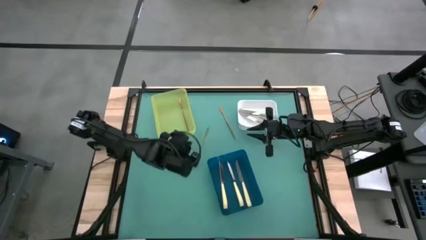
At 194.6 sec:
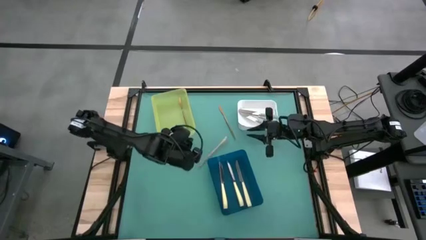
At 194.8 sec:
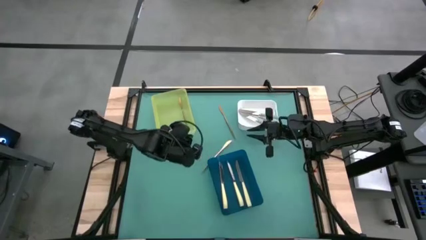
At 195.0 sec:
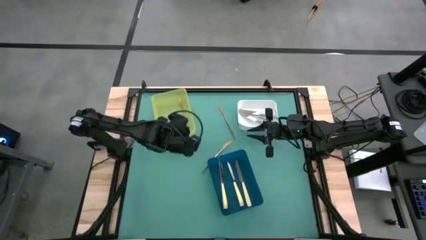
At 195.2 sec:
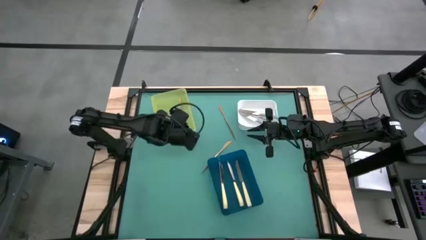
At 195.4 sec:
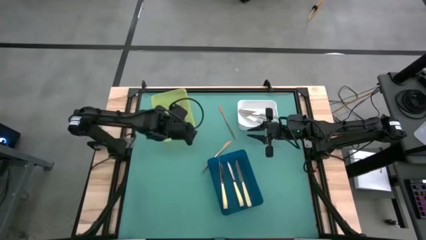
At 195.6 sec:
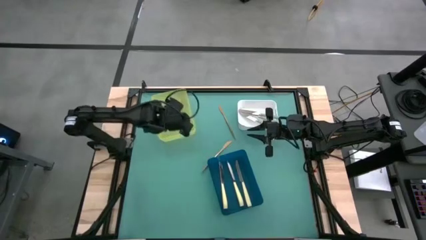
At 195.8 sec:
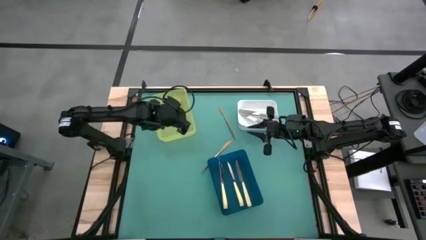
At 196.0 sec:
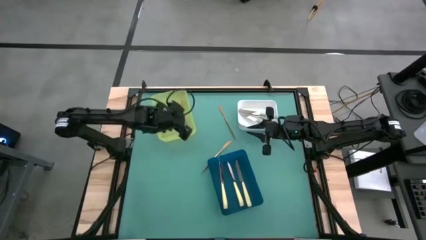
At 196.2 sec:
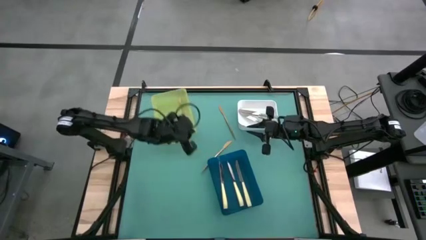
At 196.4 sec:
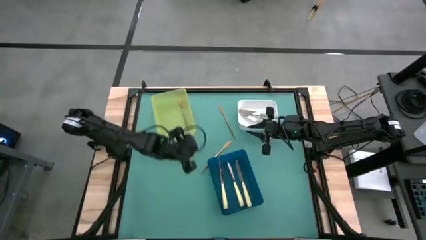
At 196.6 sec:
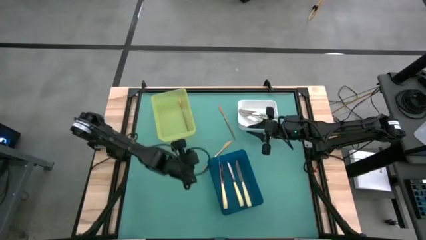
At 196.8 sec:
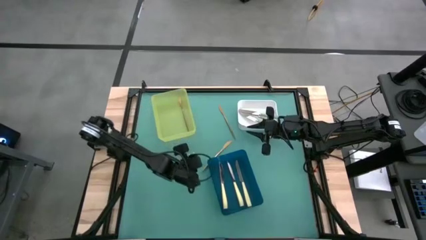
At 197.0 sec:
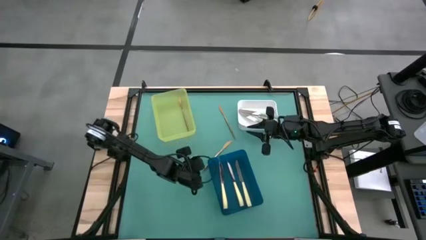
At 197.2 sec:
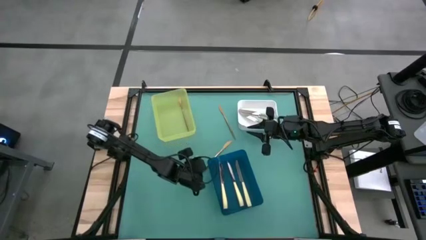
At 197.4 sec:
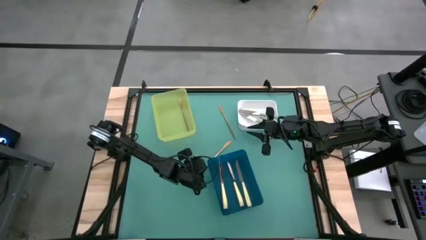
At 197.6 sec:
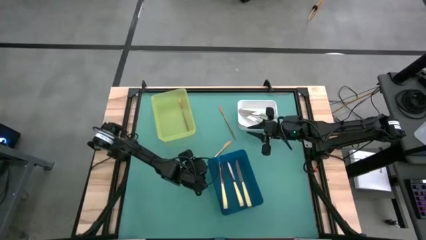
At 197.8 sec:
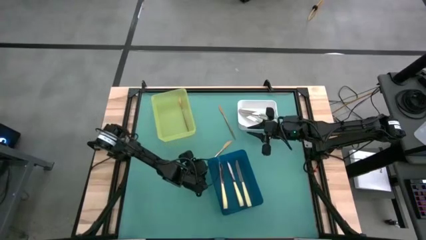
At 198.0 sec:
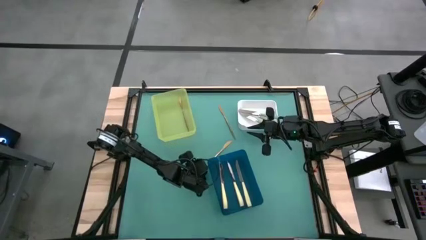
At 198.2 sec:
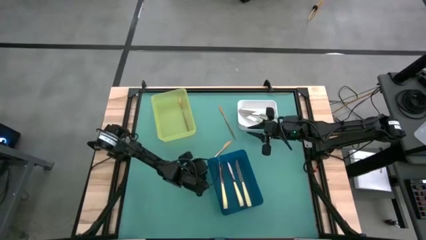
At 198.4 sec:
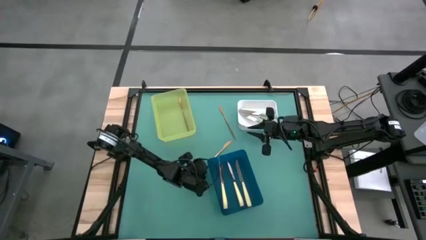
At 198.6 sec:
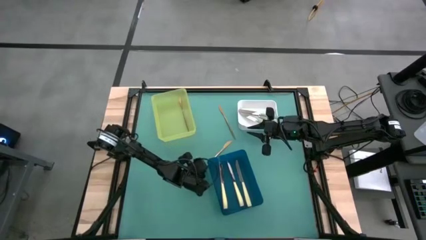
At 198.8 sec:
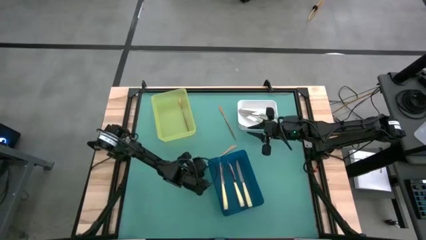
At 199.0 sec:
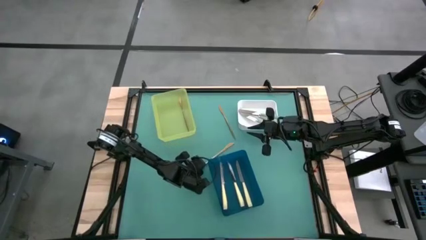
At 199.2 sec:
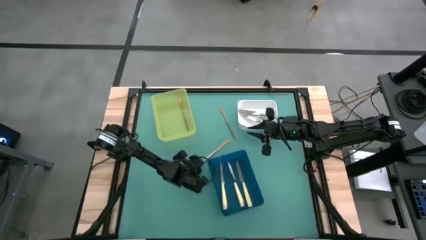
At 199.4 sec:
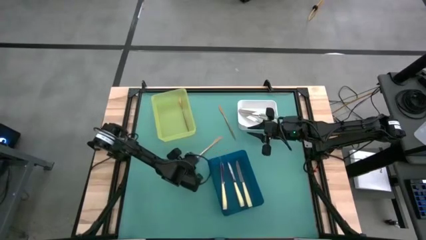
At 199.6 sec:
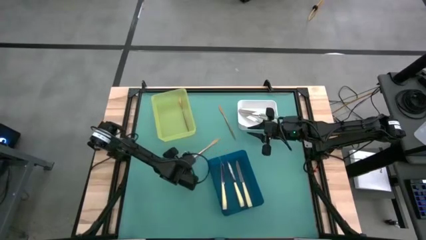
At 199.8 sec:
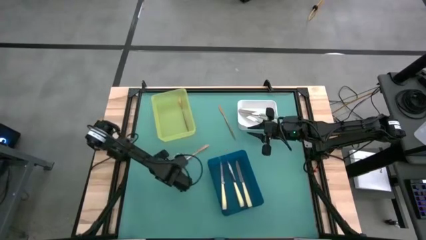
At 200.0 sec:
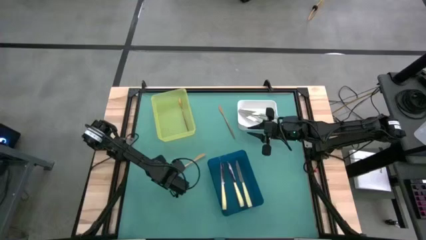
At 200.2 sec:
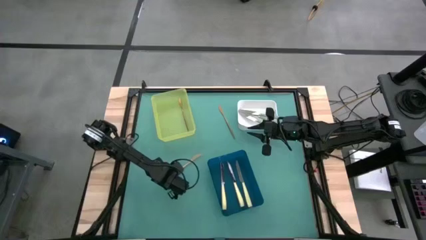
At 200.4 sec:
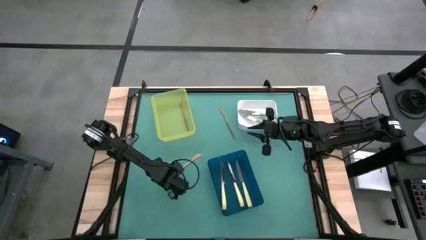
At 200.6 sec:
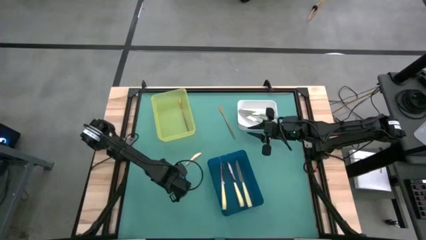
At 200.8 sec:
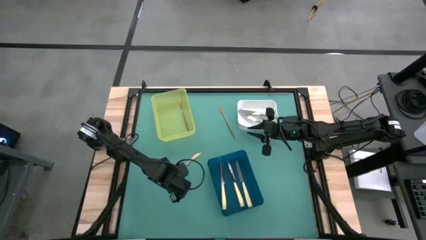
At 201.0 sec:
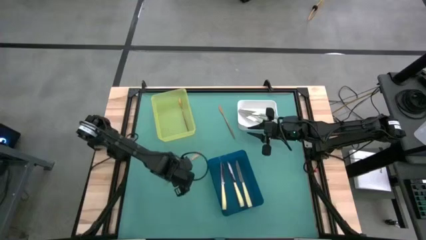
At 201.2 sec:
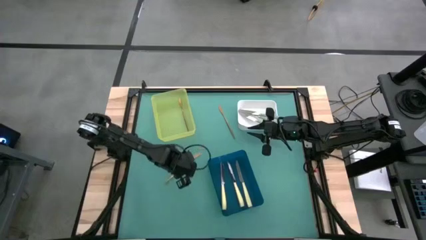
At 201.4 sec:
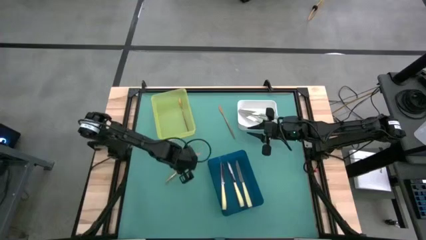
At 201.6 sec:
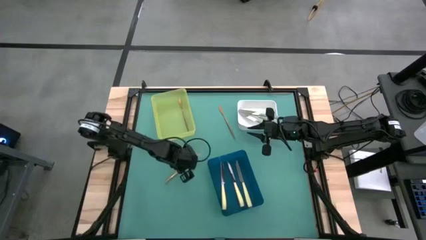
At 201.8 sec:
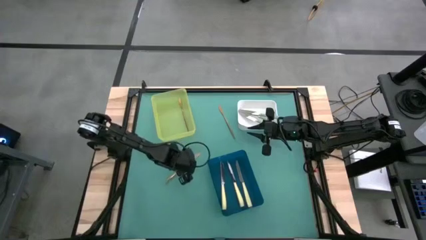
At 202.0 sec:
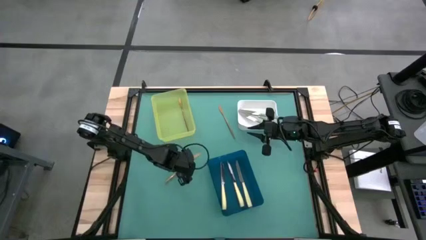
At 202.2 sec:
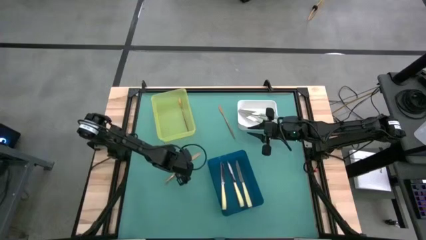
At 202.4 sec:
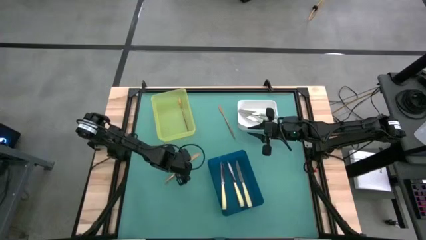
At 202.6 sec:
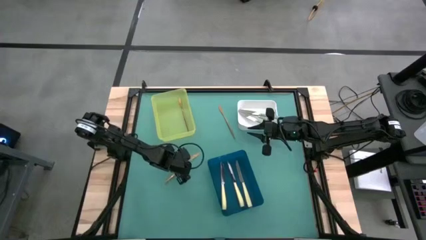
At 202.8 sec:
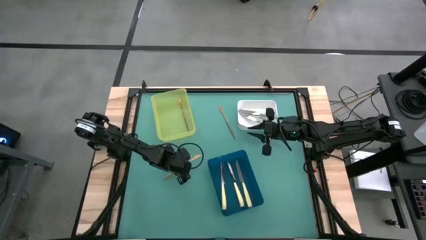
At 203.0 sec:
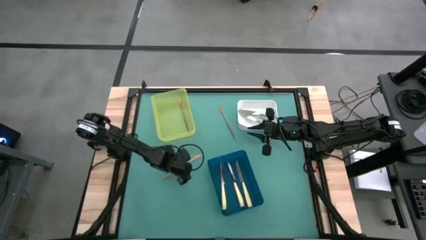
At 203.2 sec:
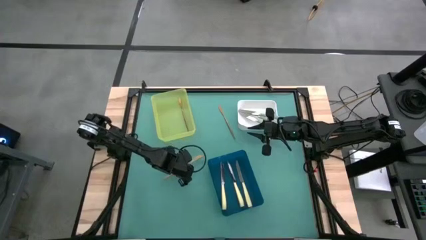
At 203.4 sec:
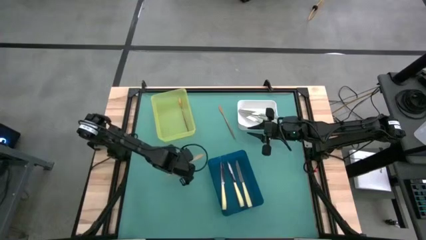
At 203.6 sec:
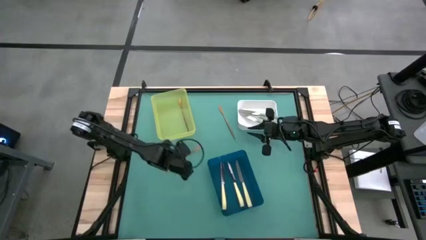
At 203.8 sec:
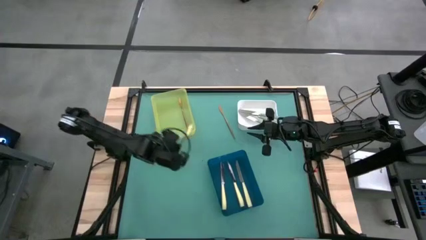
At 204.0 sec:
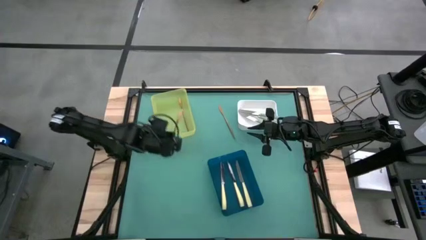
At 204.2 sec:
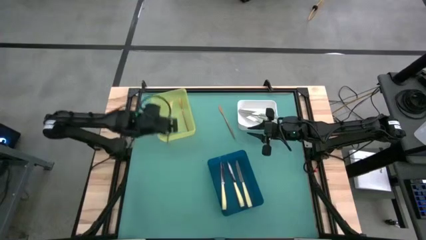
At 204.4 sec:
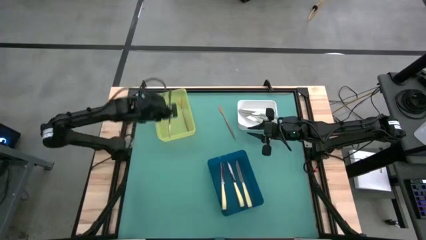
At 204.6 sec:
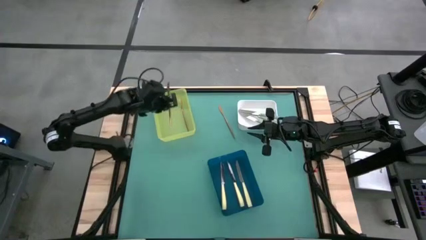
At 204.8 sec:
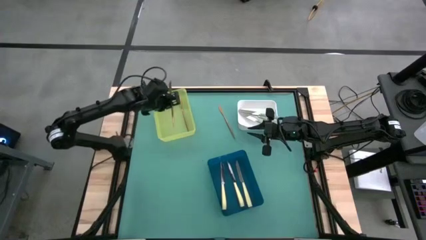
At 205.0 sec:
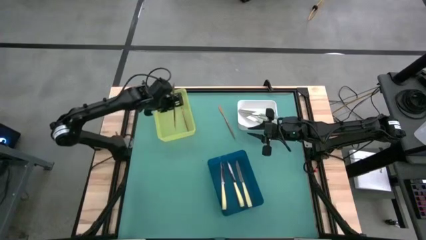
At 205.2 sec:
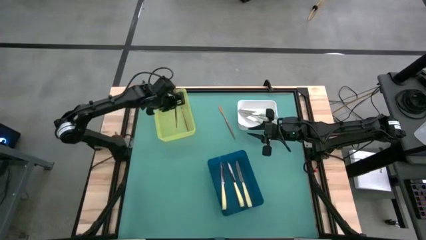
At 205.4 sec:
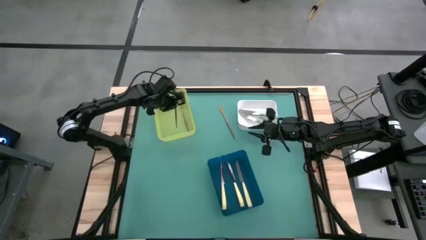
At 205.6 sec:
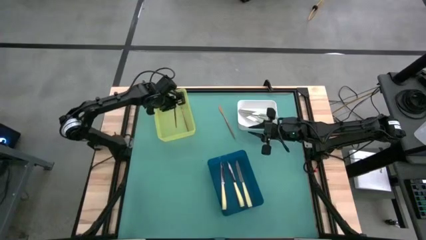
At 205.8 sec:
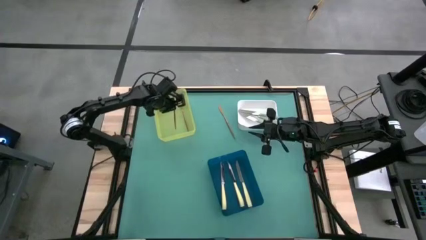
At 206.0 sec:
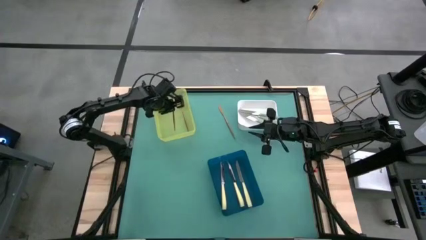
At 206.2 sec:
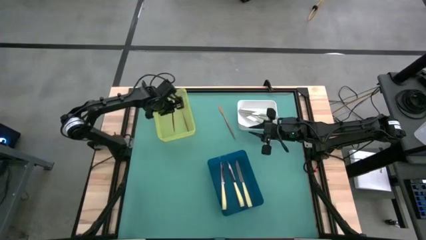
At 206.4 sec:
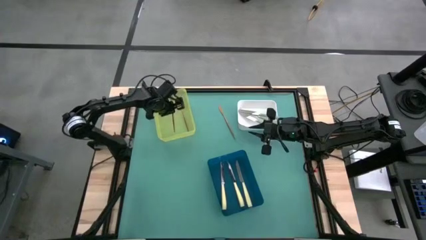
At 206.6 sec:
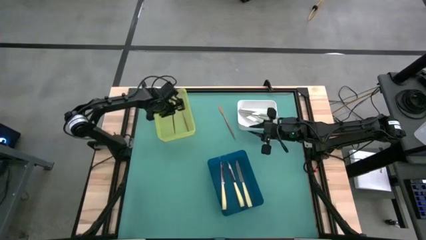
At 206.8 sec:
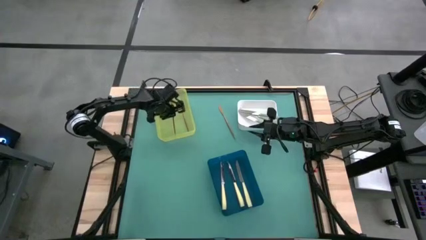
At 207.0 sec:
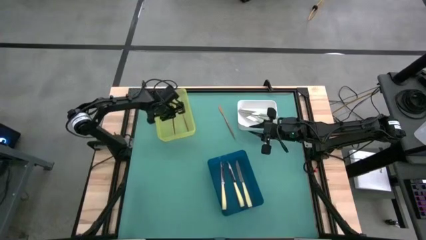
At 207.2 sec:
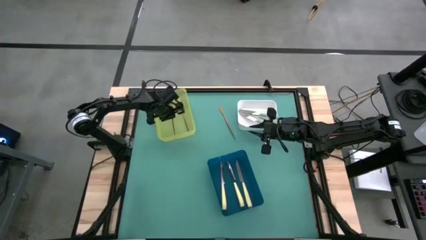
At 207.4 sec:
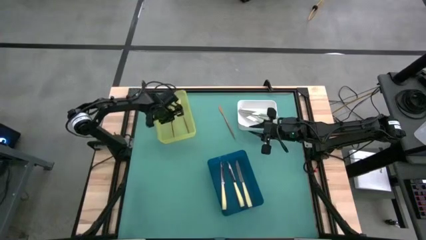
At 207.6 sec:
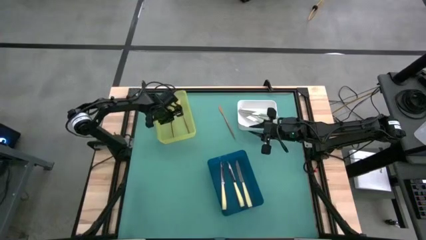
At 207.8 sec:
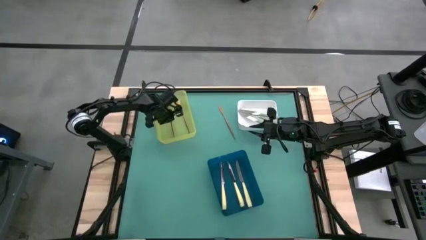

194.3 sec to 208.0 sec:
Task: Sort silverware by color (type)
Put the bottom gold knife into the yellow bin
